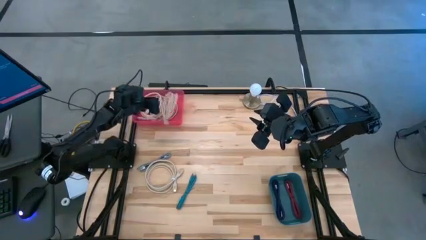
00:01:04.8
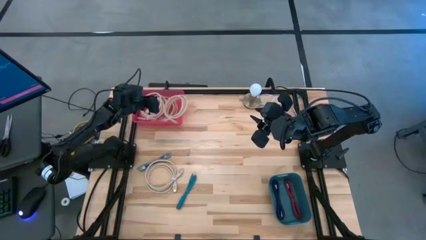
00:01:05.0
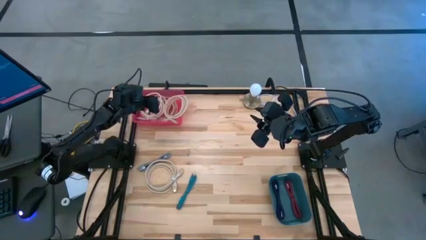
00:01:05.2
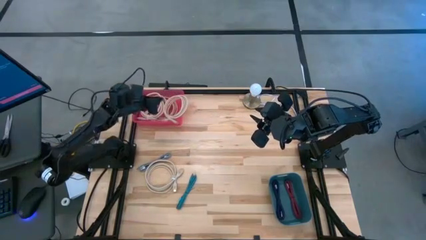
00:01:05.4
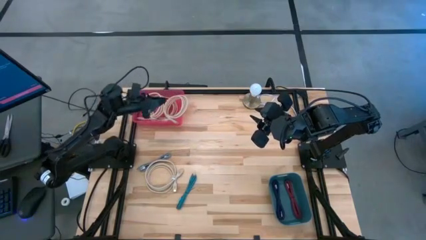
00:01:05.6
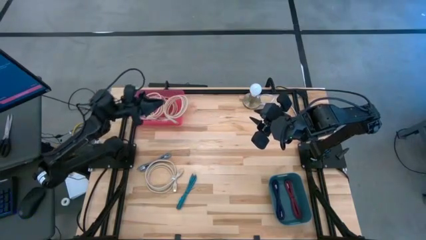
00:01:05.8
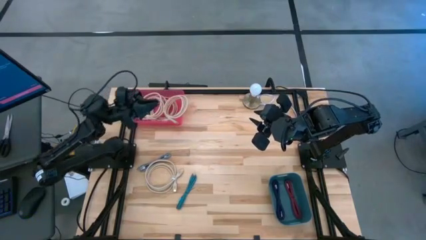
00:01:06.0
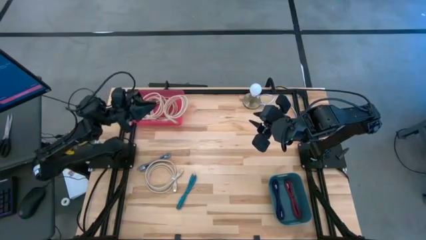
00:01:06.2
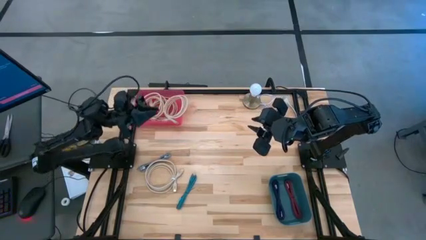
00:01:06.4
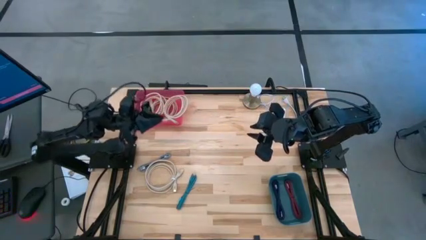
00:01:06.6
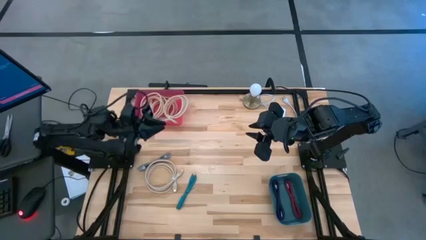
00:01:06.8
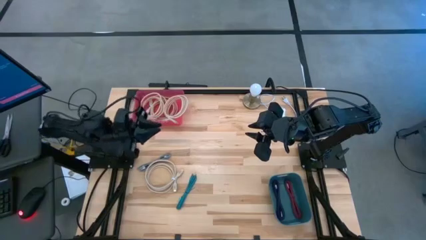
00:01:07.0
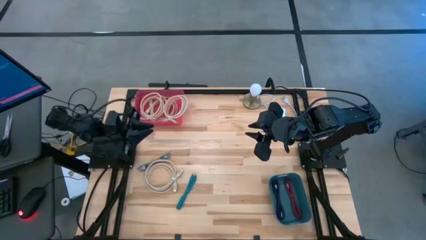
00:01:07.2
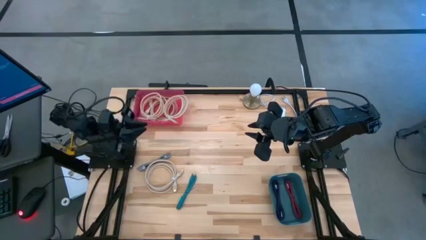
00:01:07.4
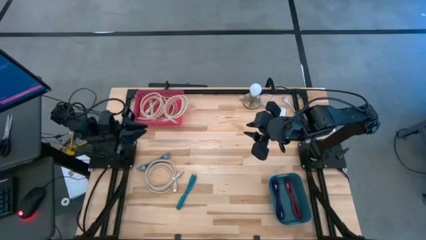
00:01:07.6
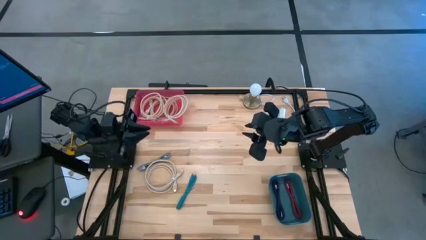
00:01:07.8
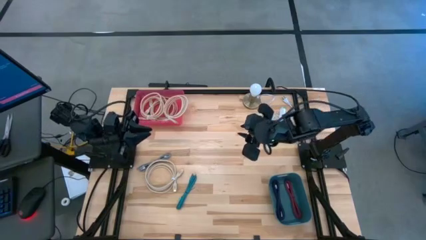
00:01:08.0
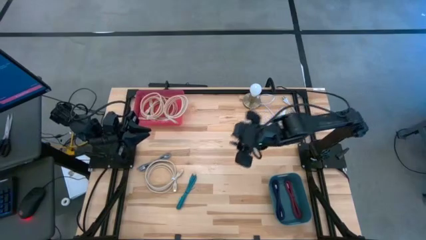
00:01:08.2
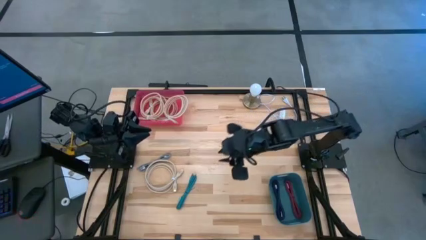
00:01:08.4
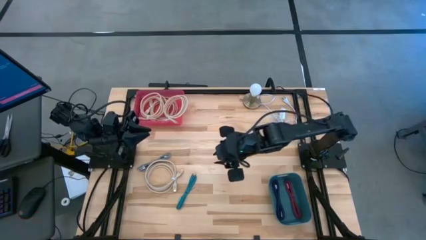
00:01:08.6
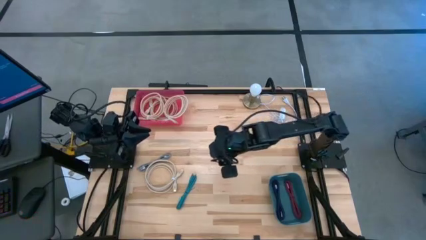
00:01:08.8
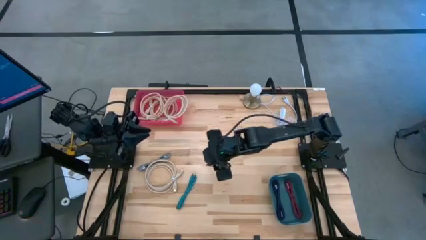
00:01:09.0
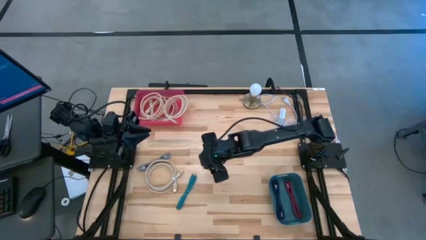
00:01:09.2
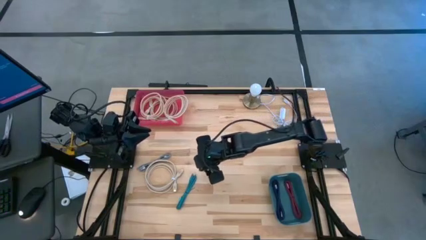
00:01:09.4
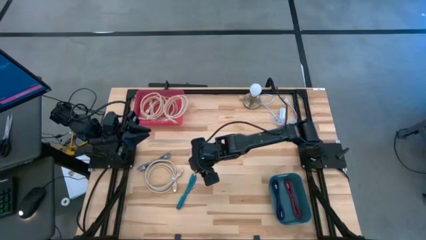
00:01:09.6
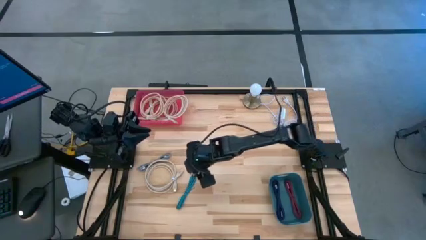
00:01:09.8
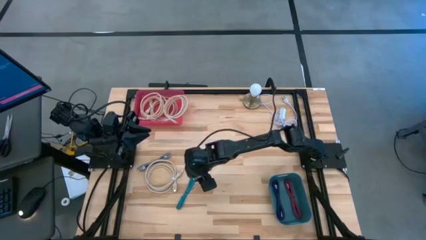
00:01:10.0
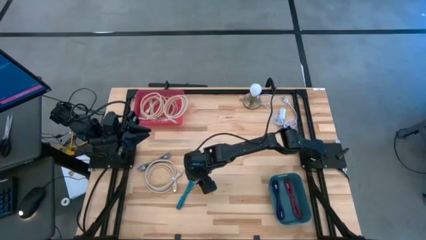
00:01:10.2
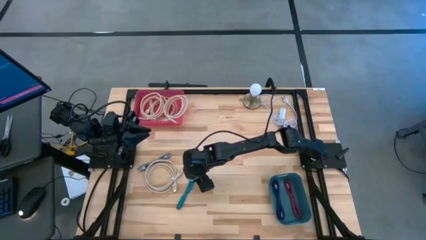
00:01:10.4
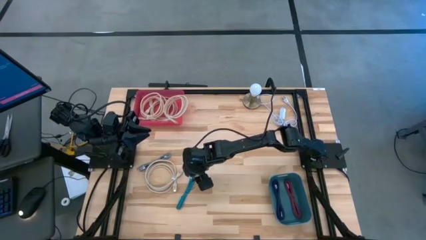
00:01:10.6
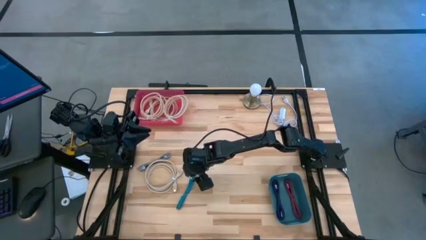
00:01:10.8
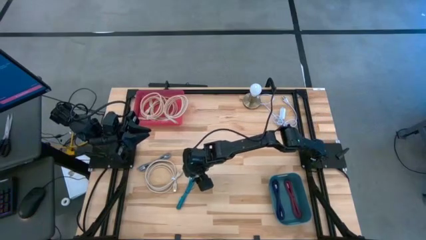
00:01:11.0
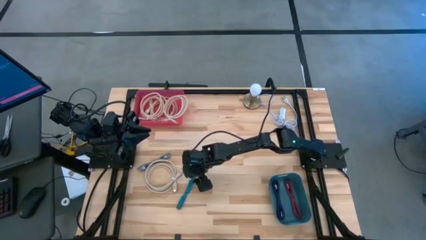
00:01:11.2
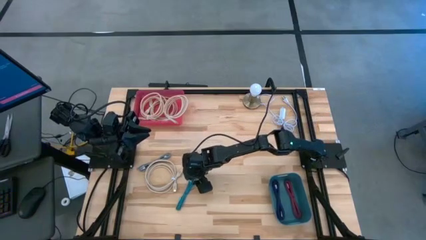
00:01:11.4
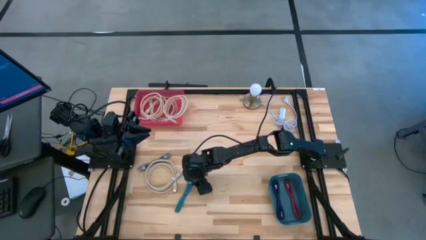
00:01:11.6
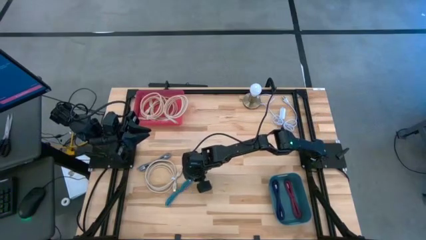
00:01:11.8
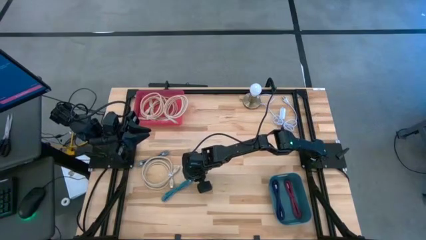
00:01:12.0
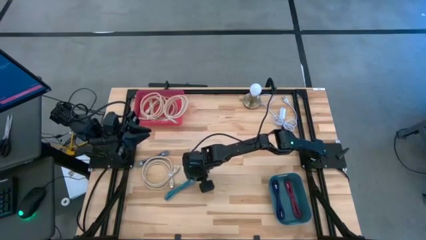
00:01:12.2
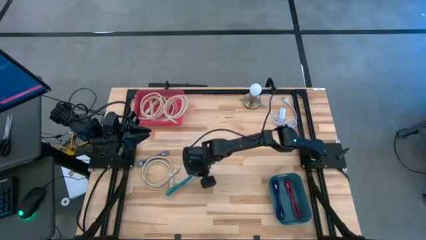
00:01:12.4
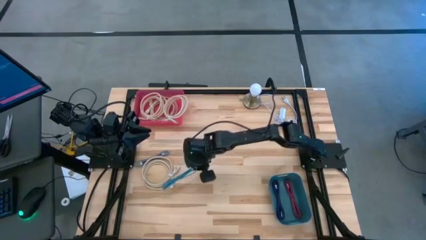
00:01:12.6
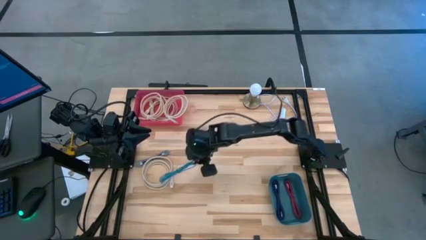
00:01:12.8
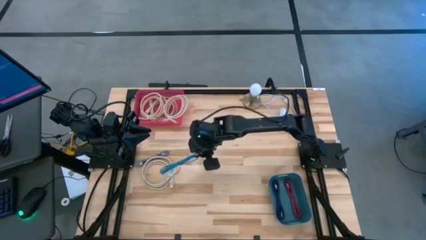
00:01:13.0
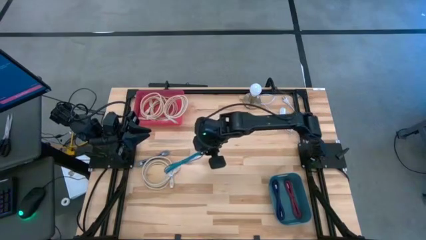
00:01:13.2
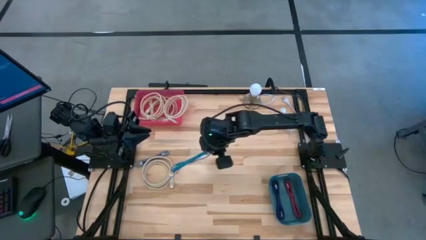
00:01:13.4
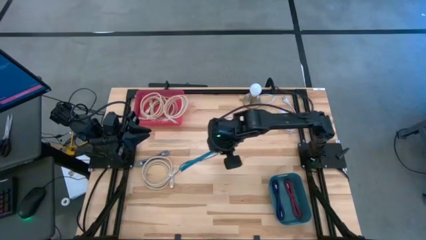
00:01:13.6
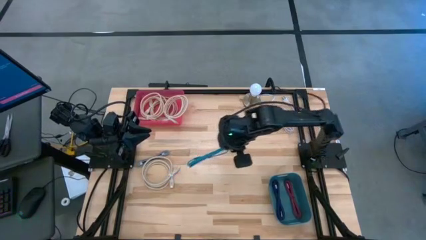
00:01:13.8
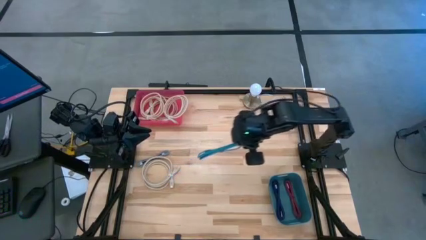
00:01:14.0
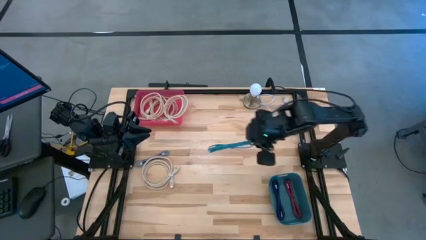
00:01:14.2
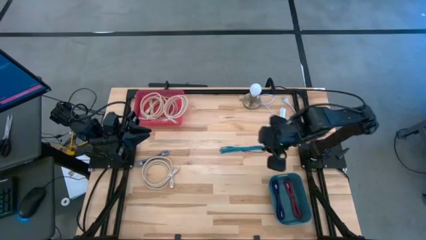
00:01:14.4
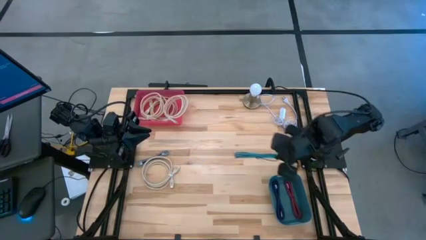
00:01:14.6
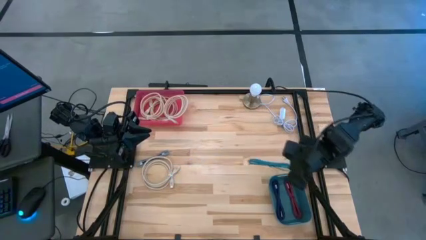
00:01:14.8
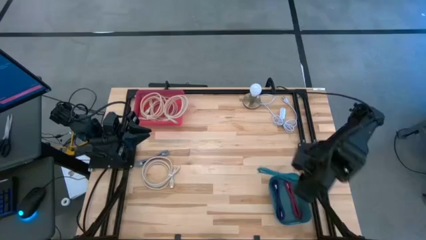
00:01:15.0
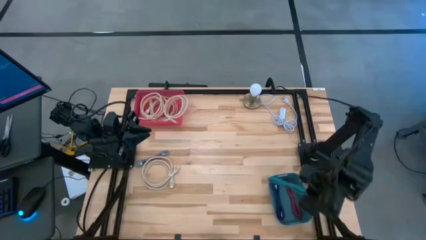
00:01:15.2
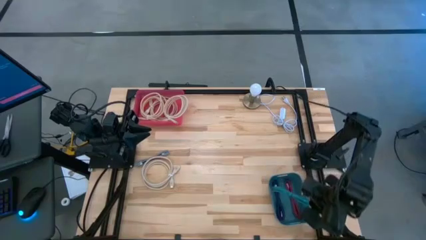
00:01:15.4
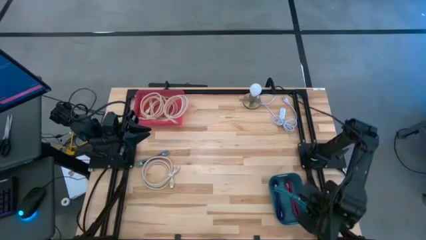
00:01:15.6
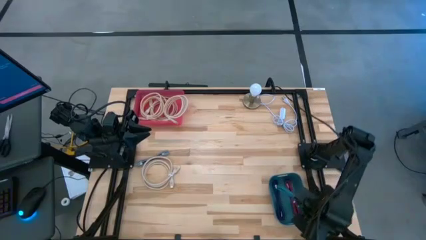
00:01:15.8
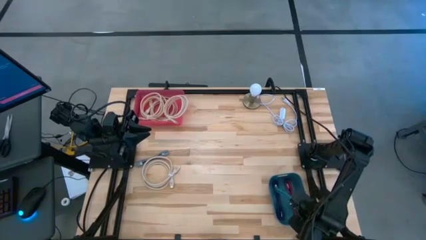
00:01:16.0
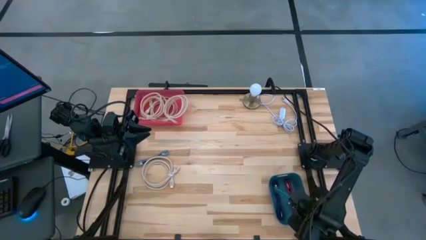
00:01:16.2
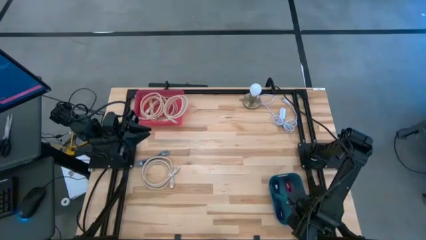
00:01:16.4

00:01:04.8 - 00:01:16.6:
Task: Pick & Place USB Port
Put the blue charger cable into the blue bin

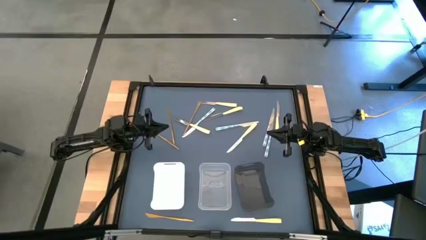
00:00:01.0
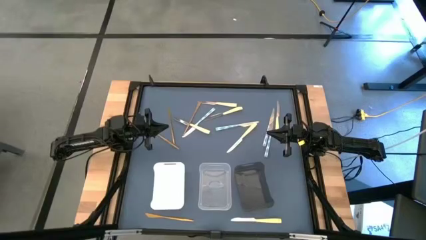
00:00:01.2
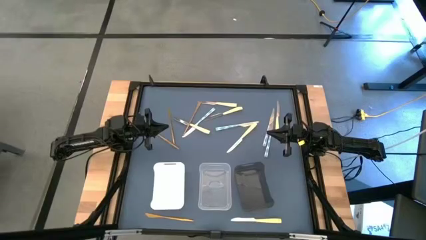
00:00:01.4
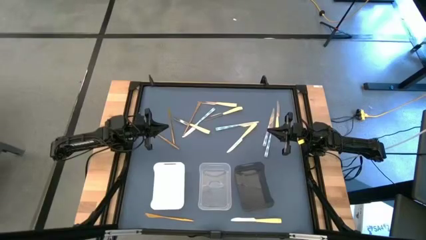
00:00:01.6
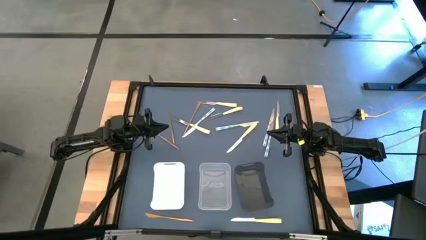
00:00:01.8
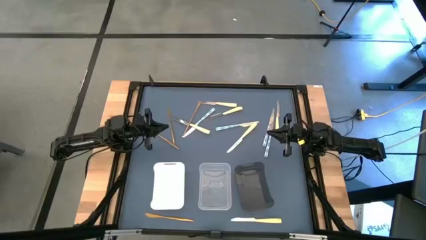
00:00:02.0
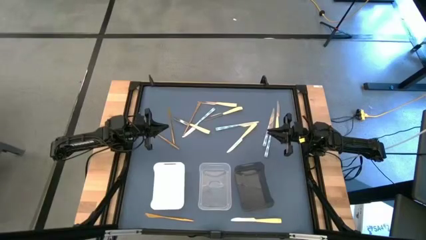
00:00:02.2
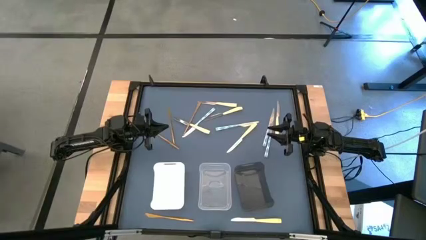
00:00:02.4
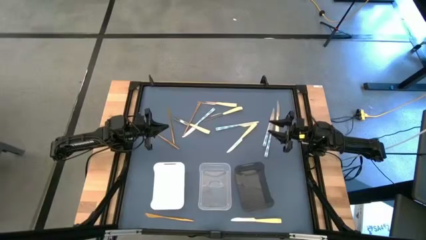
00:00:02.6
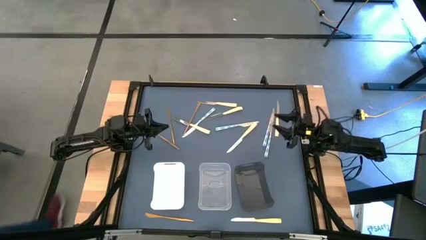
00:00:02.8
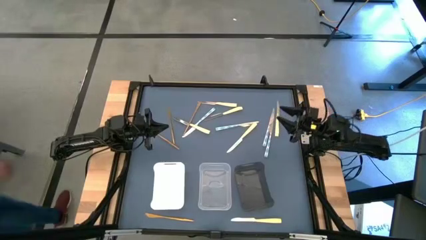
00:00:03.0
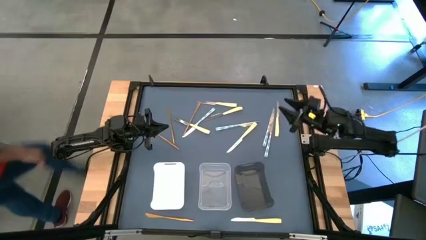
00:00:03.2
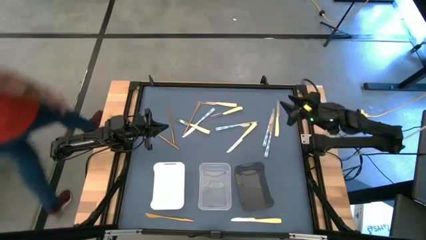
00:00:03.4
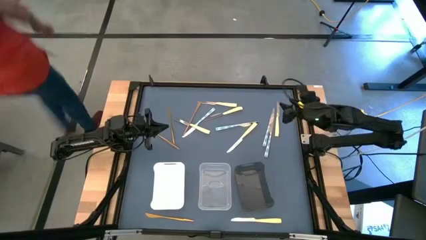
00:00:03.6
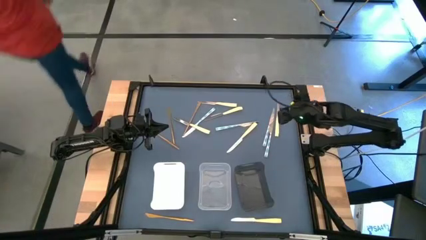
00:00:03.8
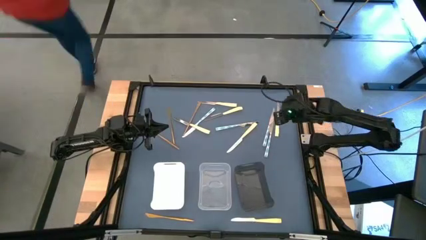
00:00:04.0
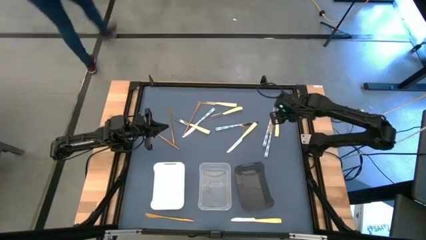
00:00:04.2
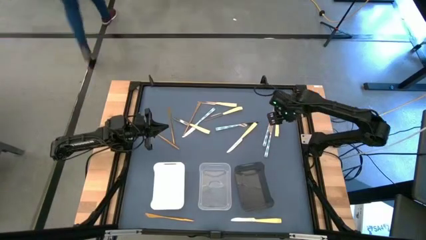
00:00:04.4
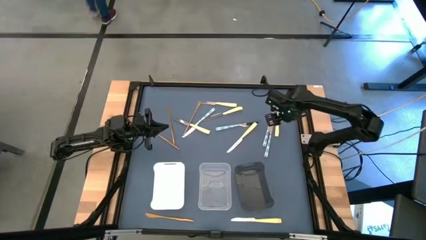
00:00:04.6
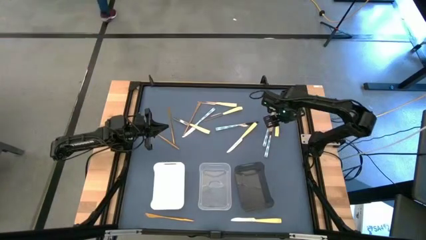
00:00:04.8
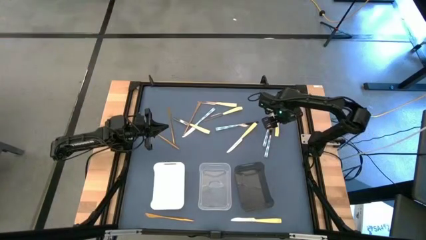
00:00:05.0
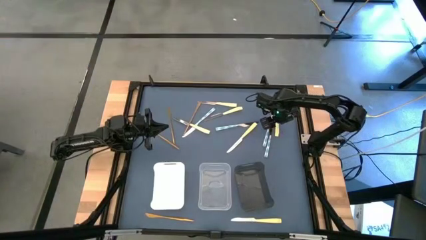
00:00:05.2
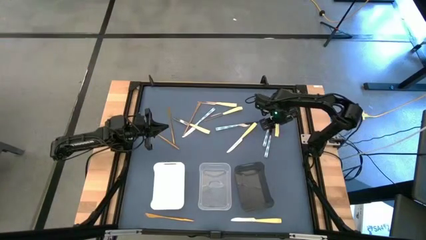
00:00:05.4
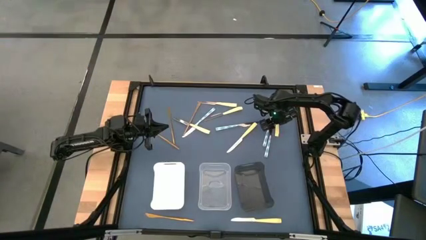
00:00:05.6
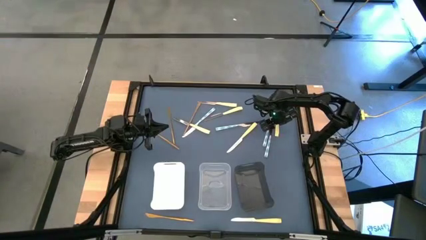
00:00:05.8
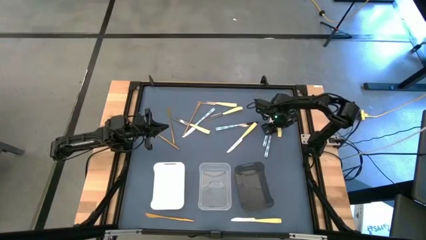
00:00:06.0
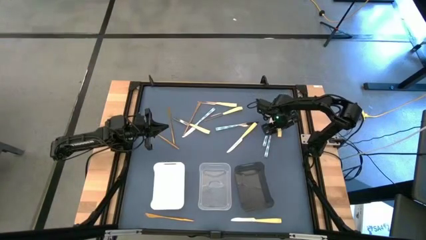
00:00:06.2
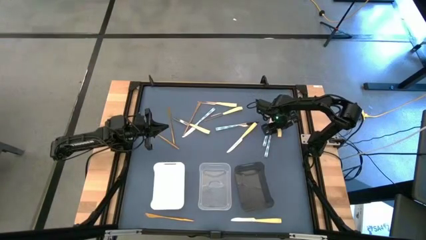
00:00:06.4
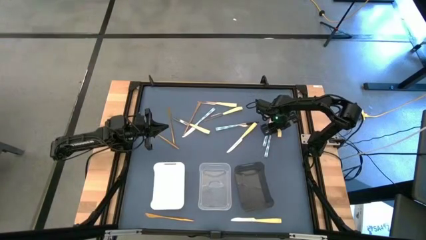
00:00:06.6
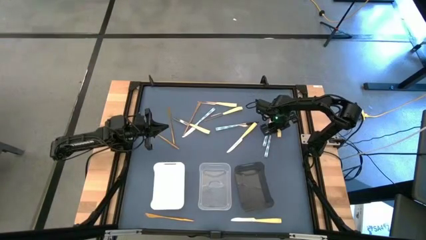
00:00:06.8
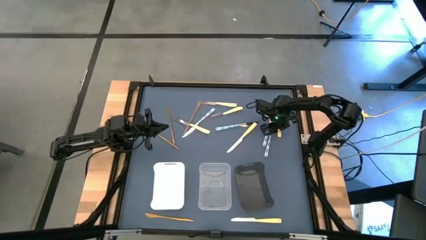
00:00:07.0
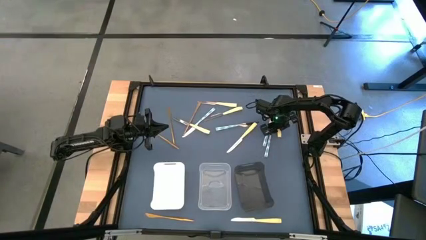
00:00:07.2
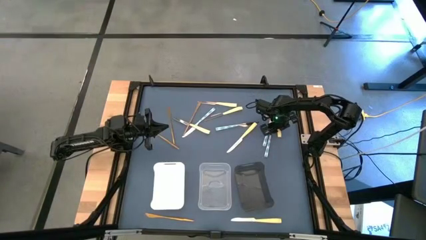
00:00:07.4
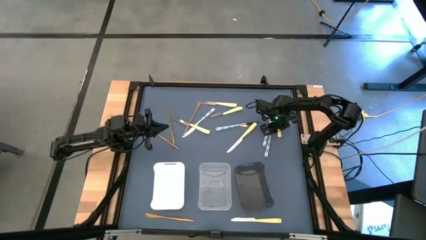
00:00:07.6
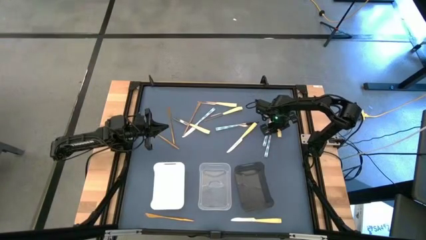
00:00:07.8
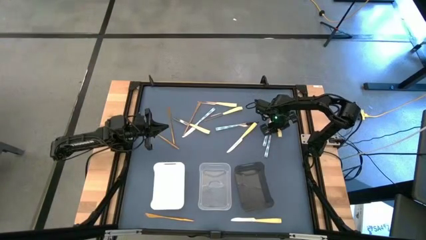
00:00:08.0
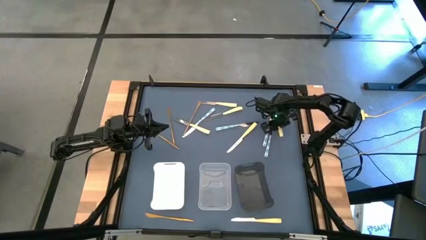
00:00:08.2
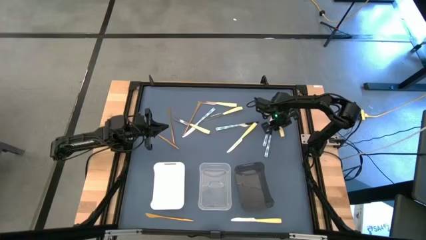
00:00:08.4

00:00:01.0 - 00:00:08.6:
Task: Sort silverware by color (type)
Put the yellow table knife into the black transparent bin
